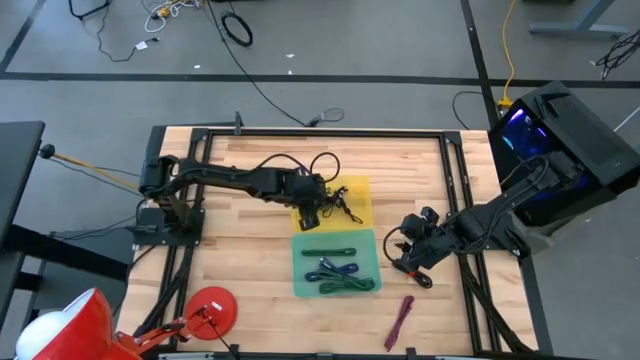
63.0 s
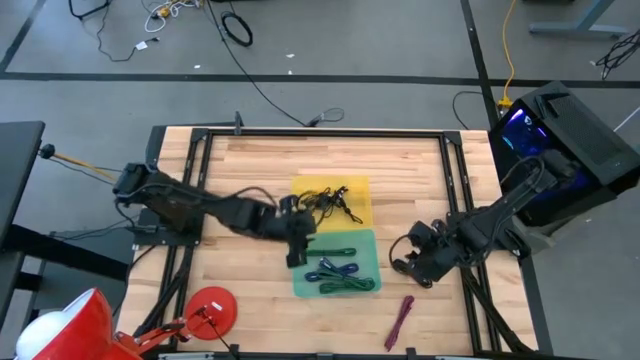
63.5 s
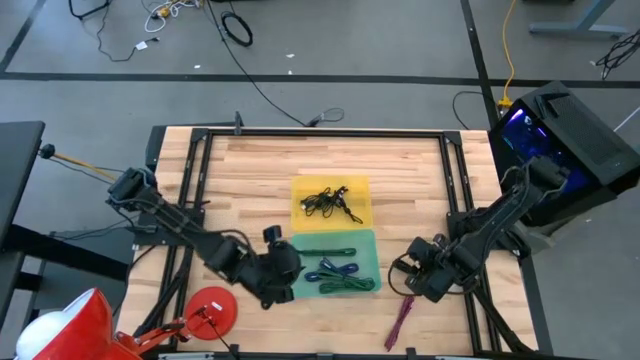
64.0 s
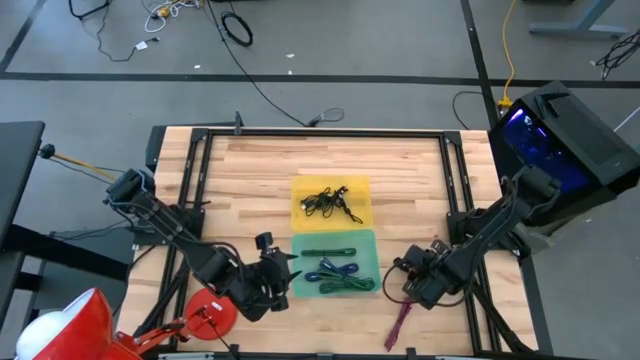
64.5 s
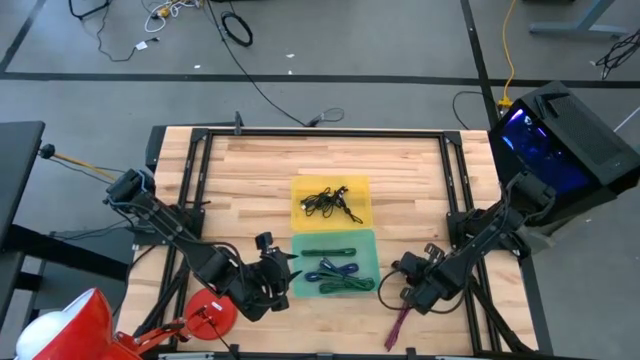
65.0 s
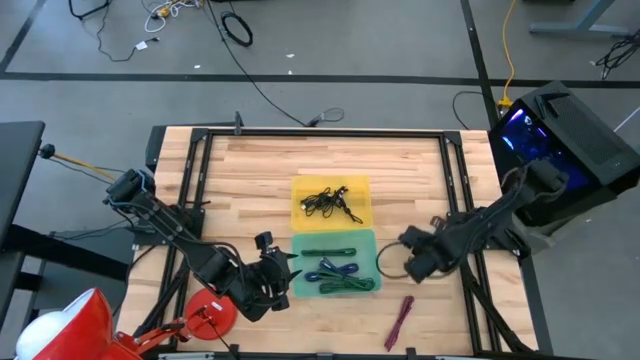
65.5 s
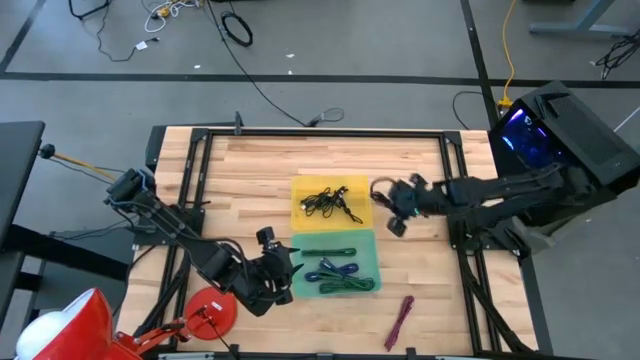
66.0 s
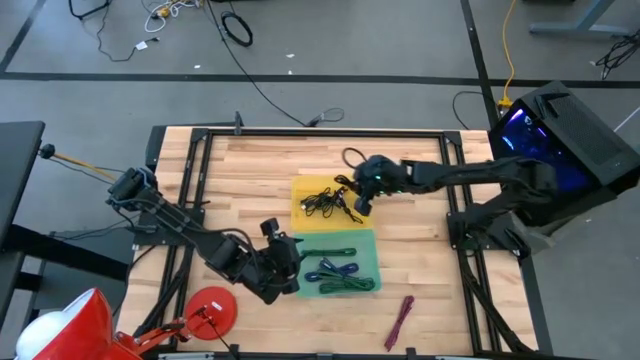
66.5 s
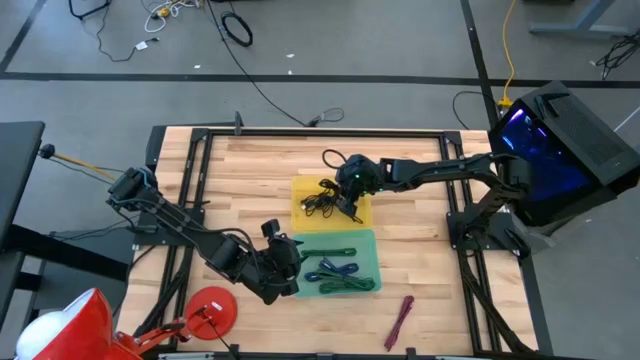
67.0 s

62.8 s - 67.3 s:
Task: Pick & Place USB Port
Put the black charger cable into the yellow bin

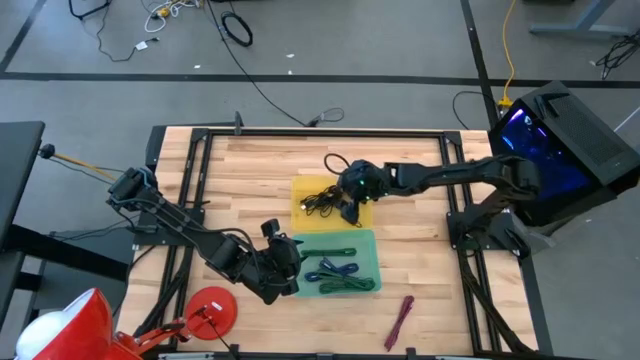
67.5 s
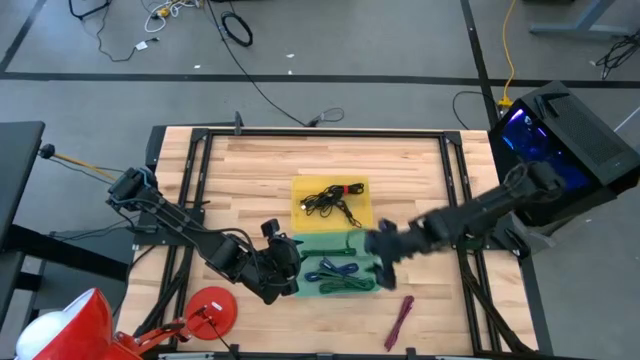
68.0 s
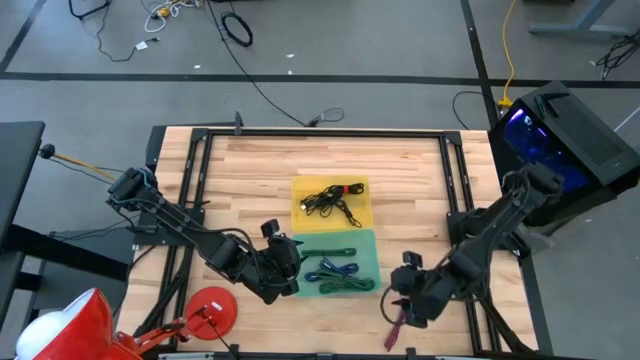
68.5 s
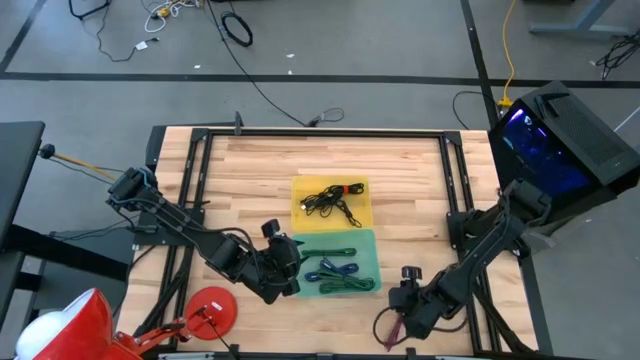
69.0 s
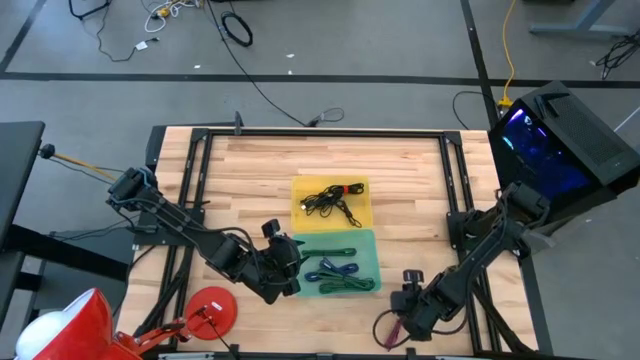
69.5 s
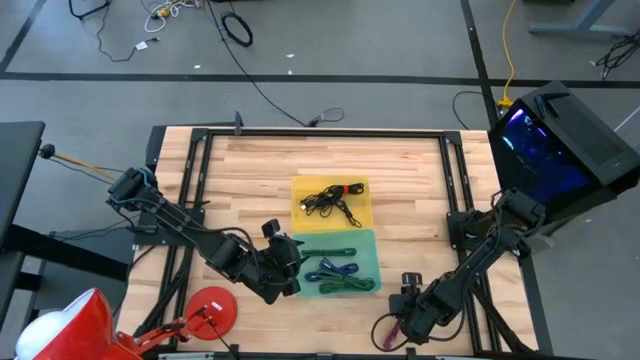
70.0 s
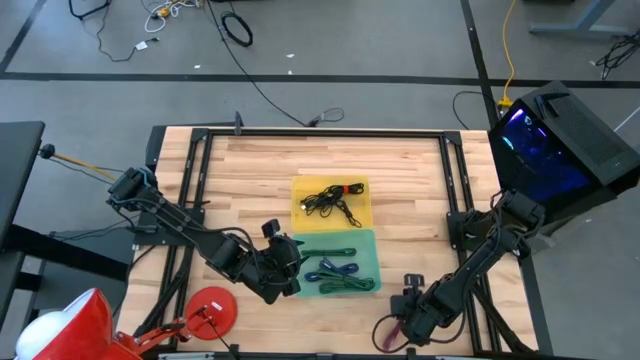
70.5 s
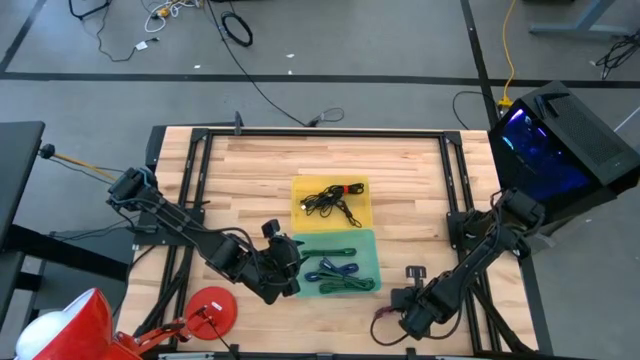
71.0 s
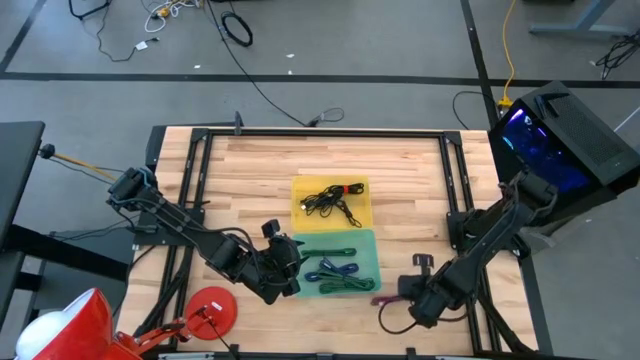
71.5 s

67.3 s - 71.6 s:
Put the striped pink charger cable into the blue bin

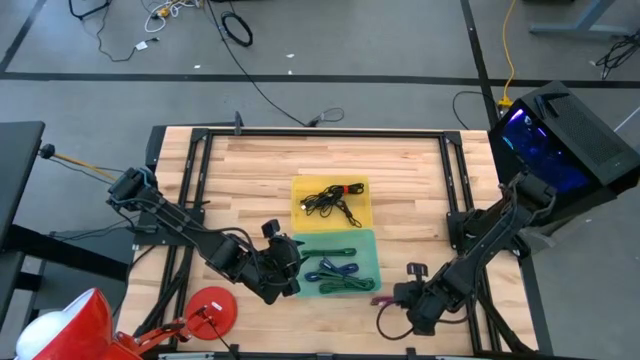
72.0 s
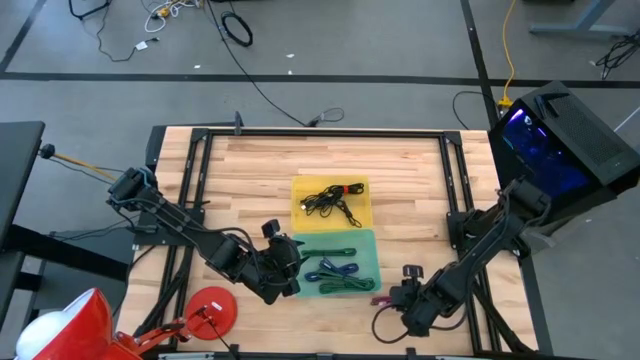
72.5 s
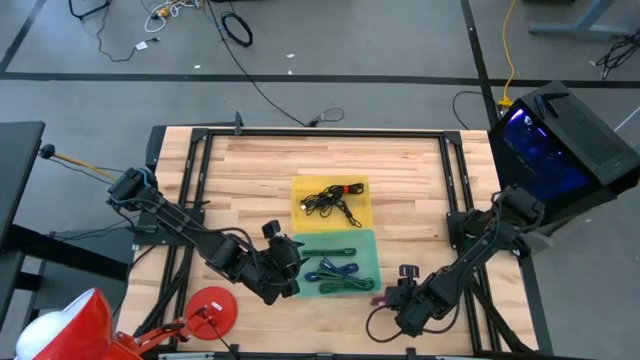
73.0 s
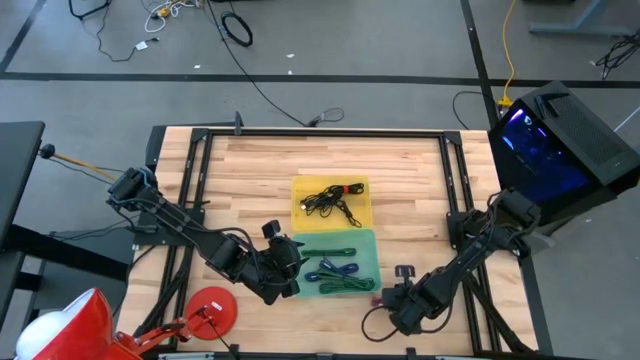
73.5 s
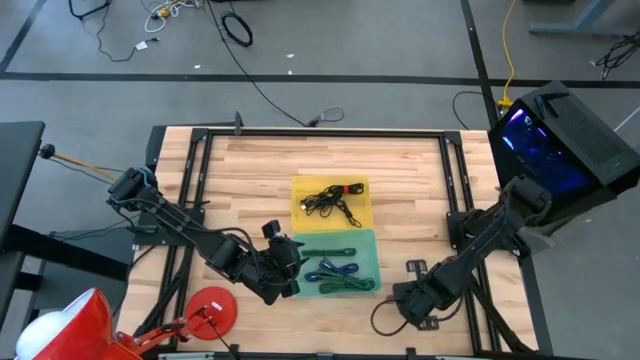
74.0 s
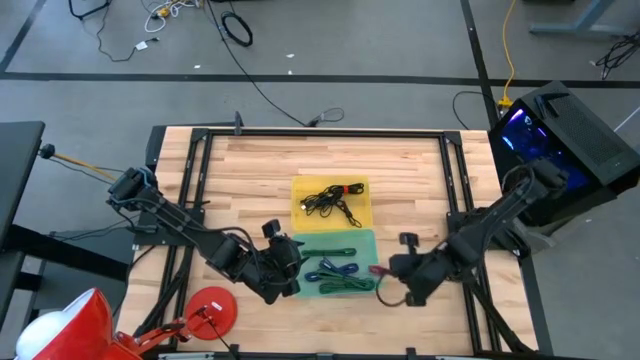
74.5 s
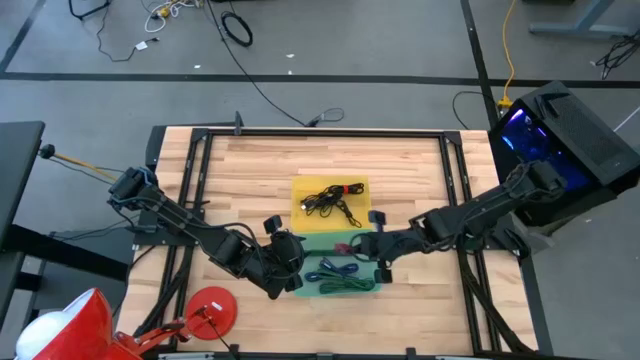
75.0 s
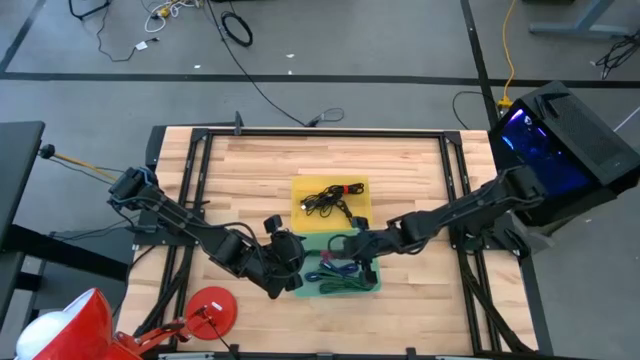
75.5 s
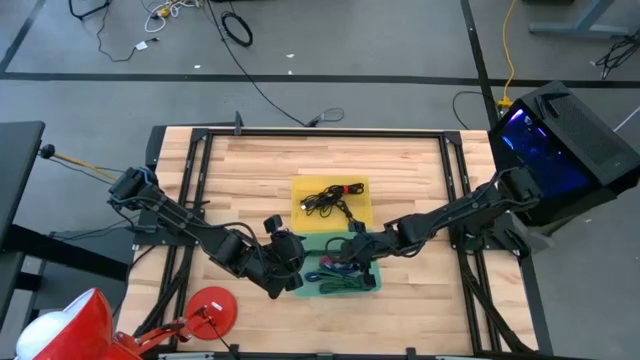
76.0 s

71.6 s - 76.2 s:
Put the striped pink charger cable into the blue bin

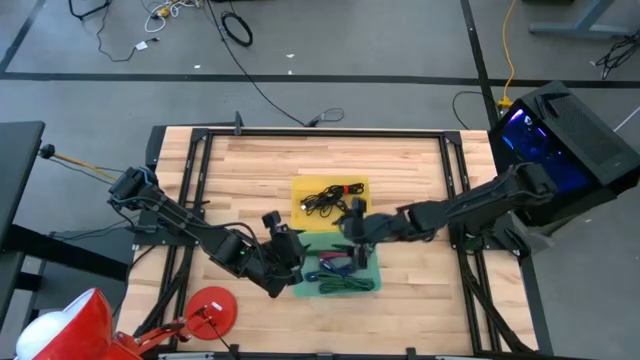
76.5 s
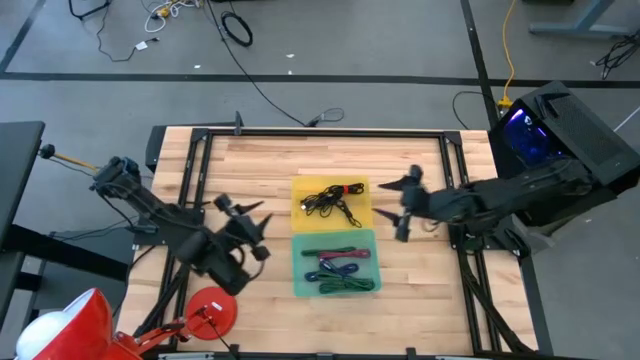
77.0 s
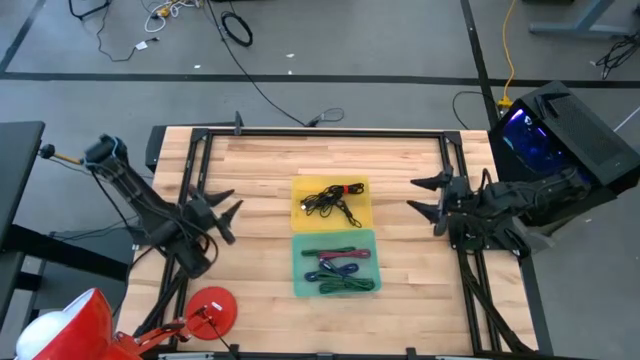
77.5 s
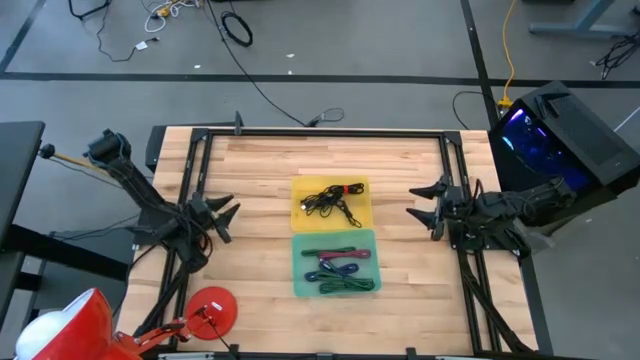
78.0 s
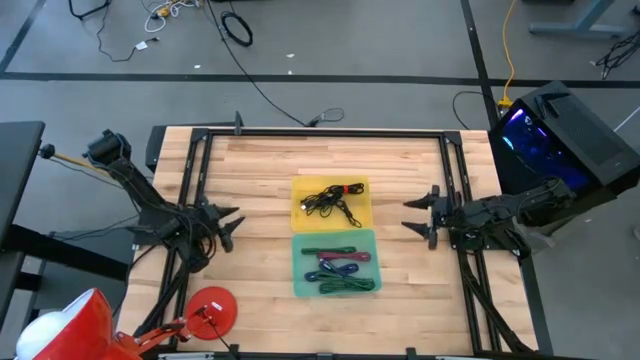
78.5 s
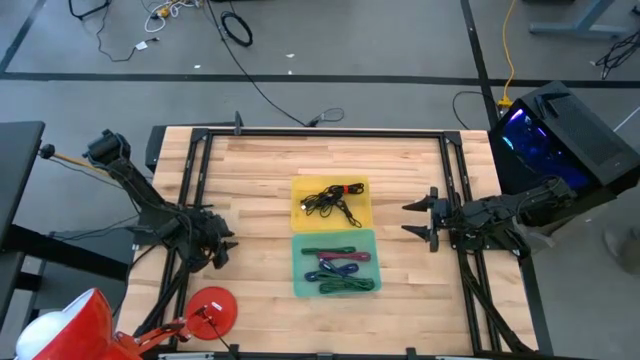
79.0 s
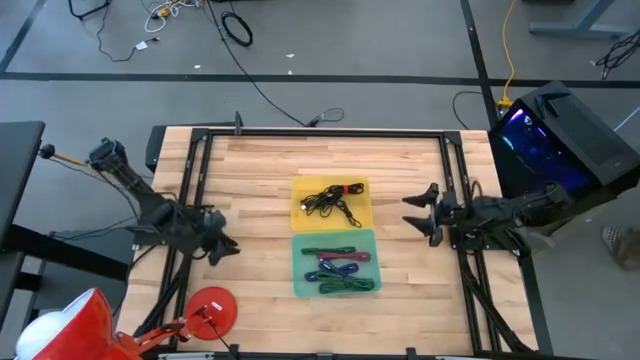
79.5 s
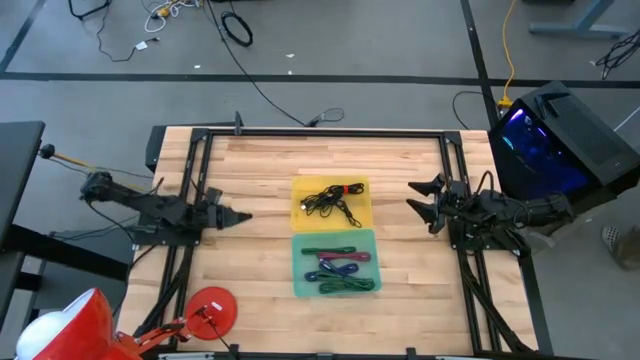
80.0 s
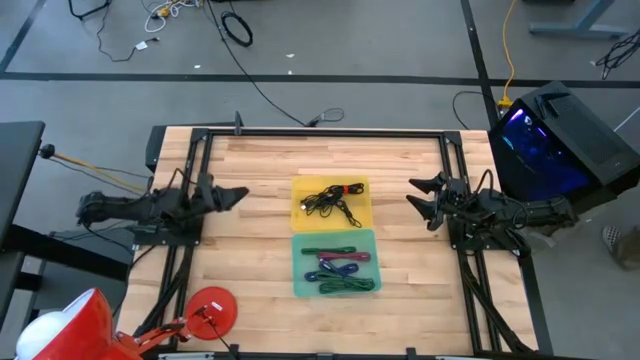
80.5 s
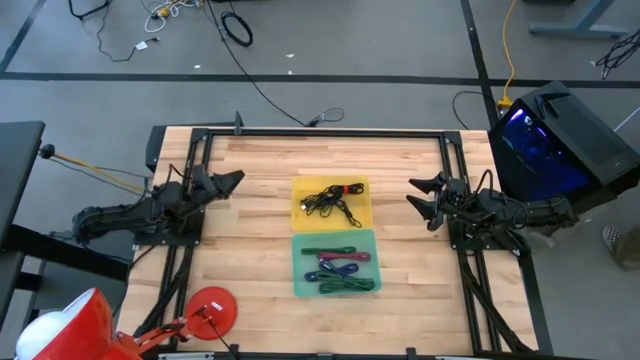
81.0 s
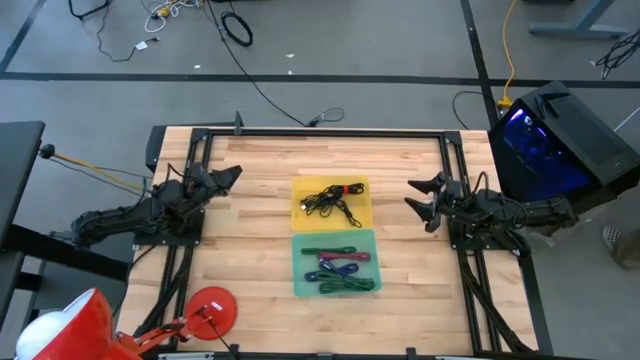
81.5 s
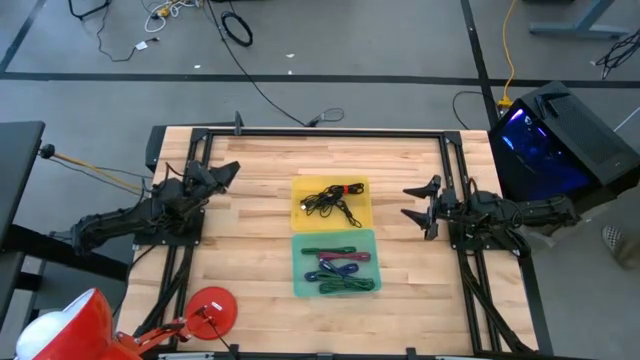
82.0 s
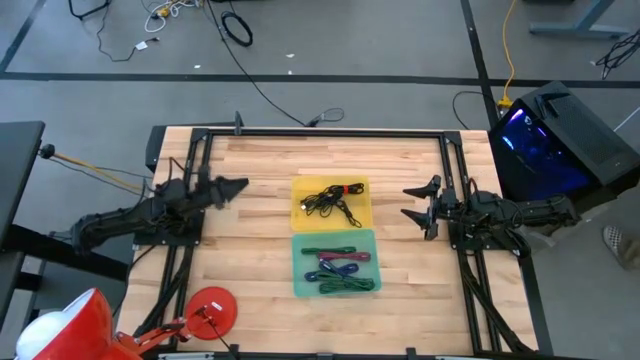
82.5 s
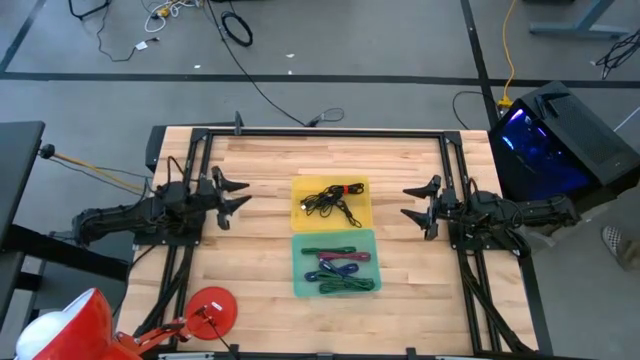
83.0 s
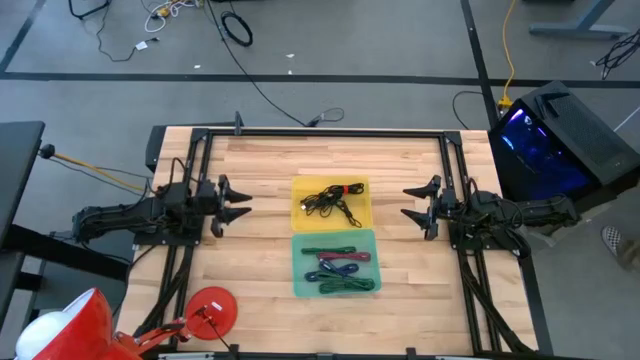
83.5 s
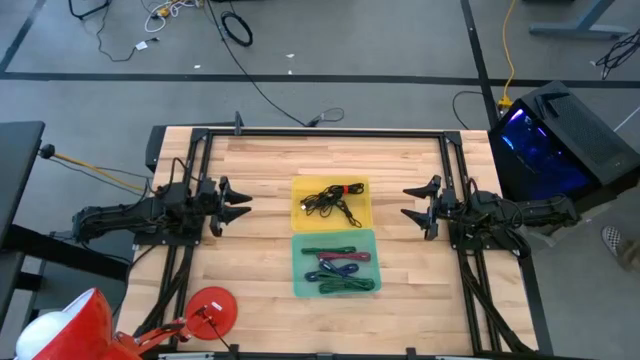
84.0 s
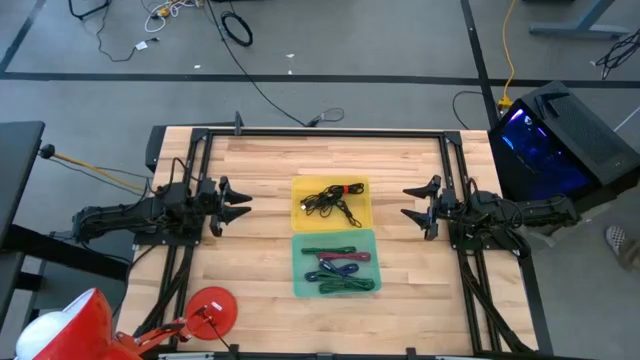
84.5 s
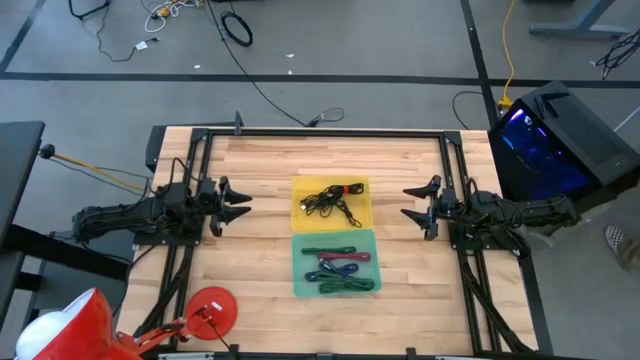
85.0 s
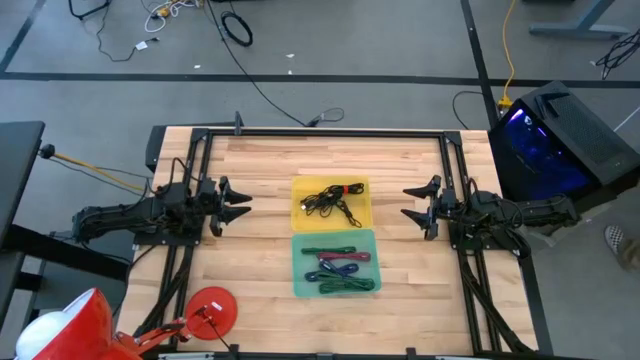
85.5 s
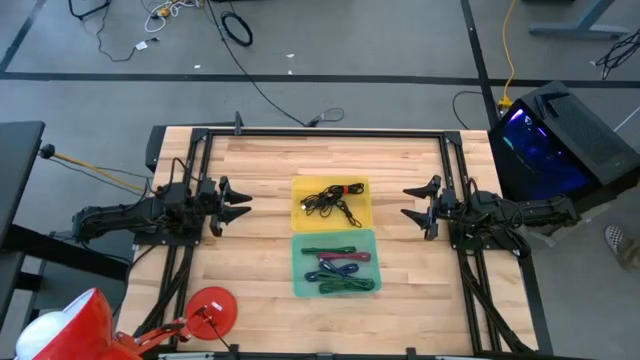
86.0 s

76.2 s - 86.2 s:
Return to Home Position
